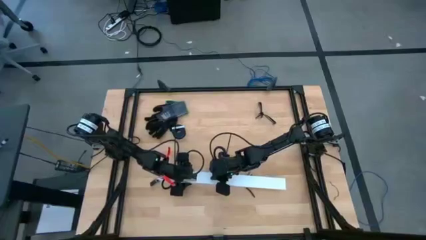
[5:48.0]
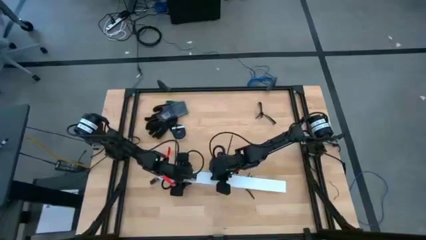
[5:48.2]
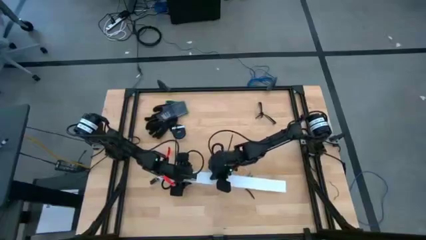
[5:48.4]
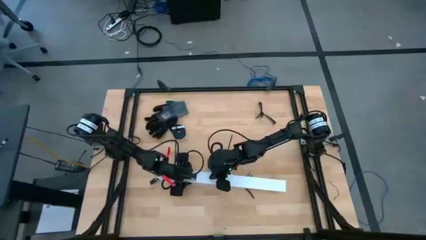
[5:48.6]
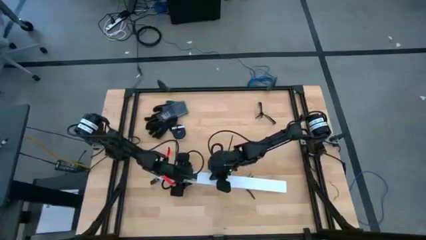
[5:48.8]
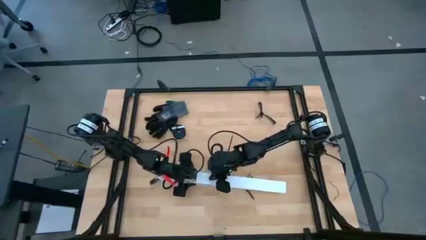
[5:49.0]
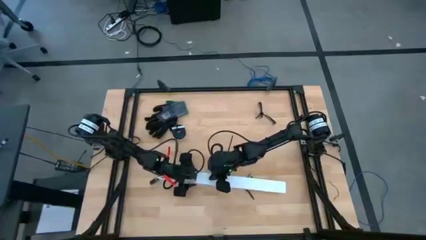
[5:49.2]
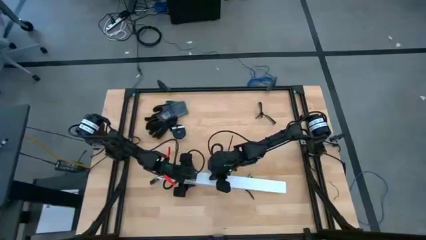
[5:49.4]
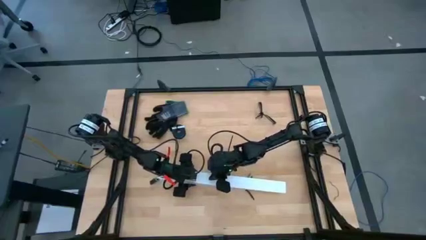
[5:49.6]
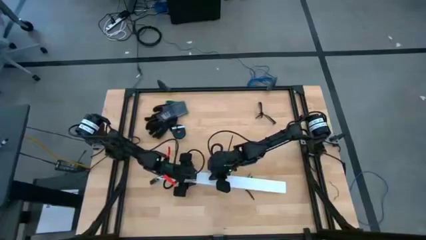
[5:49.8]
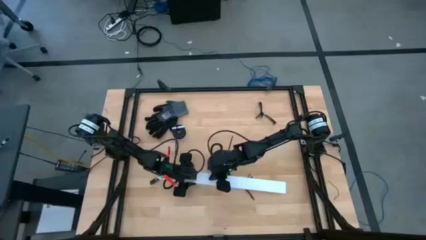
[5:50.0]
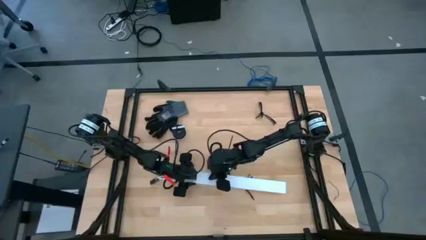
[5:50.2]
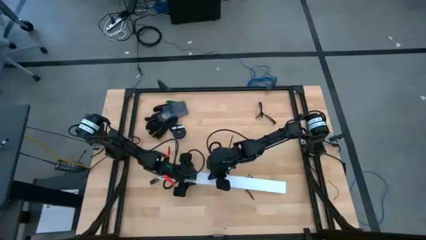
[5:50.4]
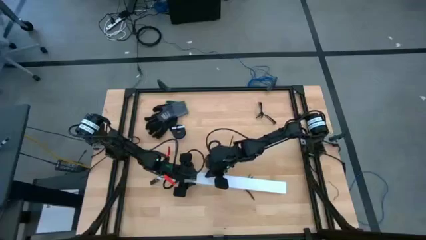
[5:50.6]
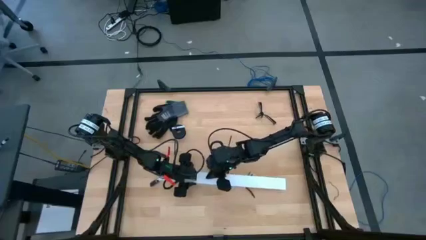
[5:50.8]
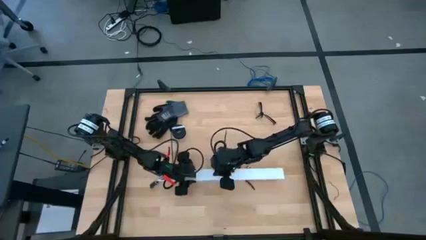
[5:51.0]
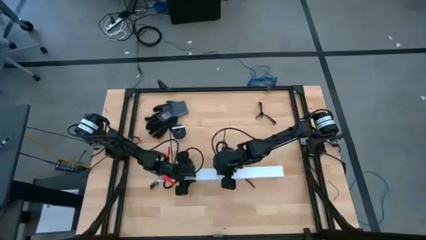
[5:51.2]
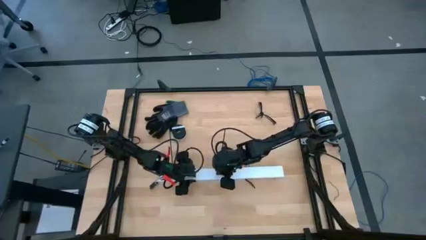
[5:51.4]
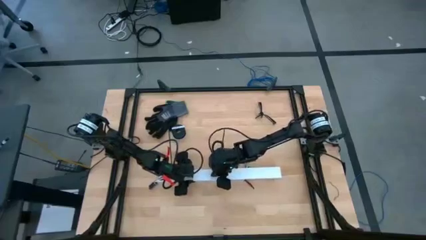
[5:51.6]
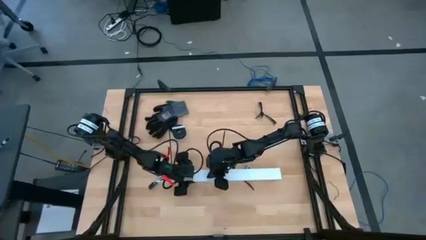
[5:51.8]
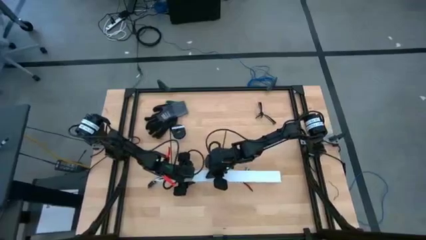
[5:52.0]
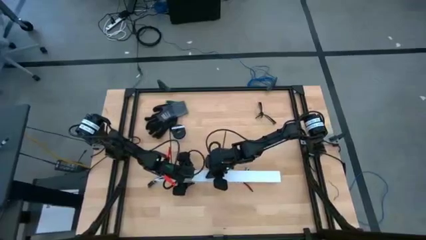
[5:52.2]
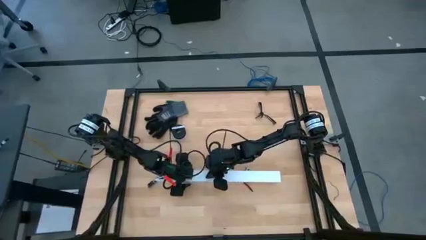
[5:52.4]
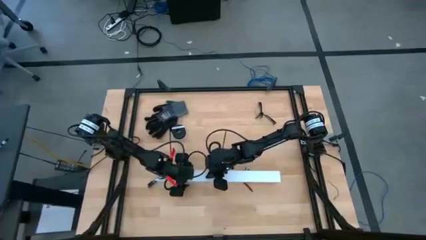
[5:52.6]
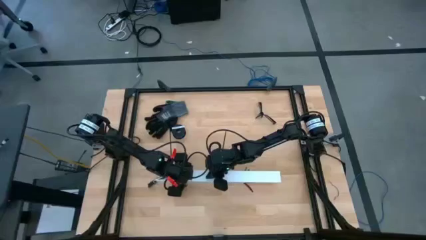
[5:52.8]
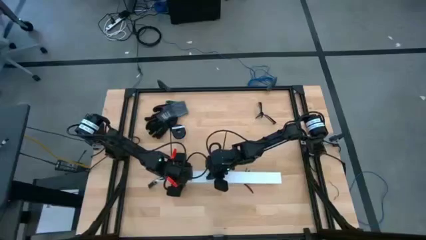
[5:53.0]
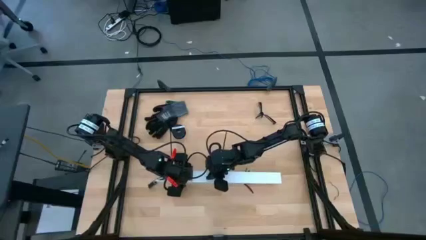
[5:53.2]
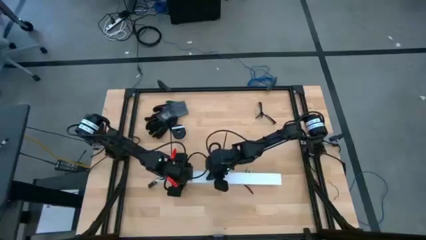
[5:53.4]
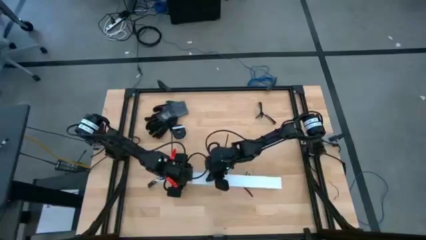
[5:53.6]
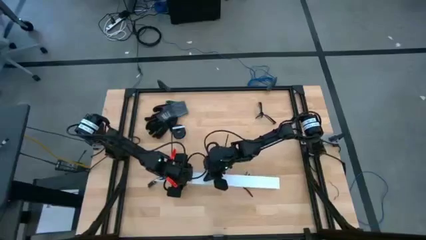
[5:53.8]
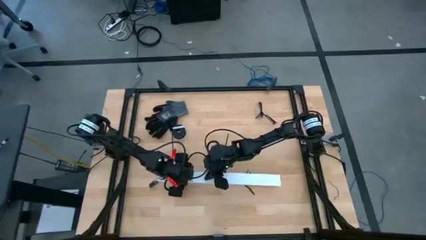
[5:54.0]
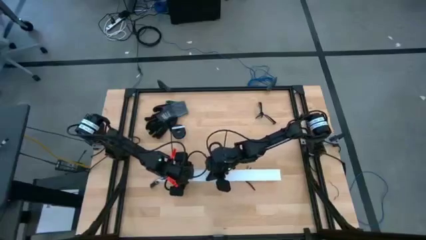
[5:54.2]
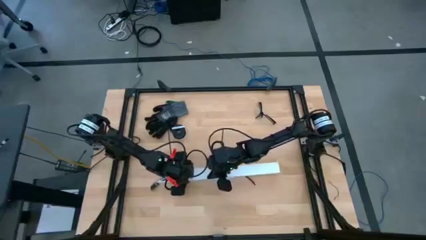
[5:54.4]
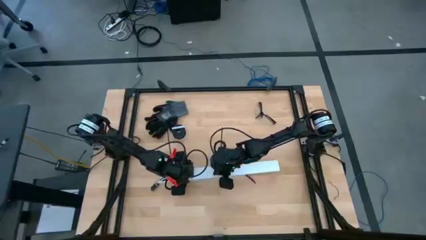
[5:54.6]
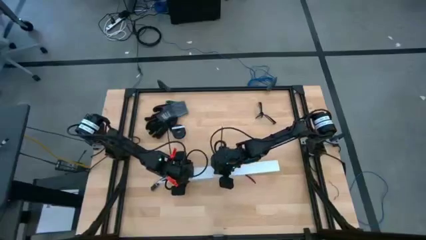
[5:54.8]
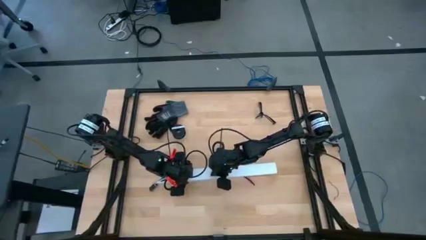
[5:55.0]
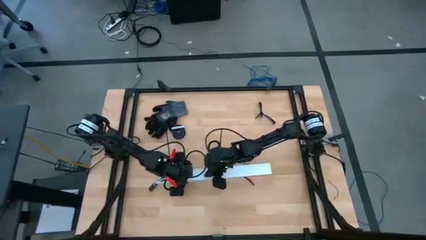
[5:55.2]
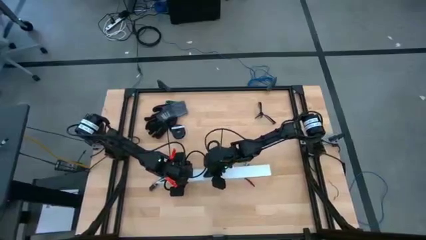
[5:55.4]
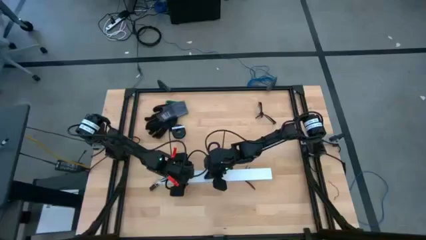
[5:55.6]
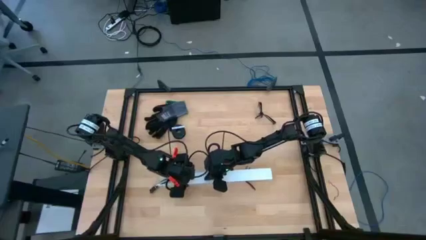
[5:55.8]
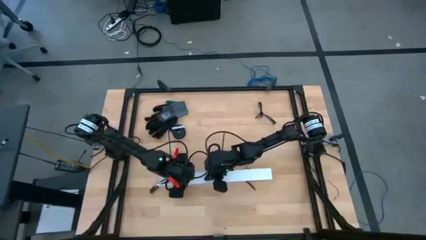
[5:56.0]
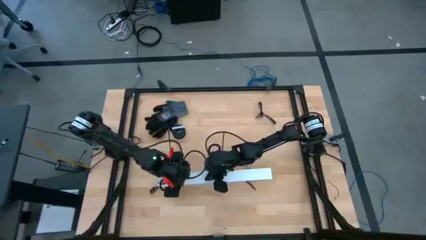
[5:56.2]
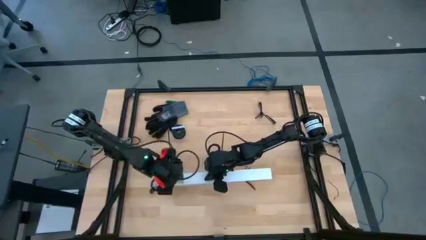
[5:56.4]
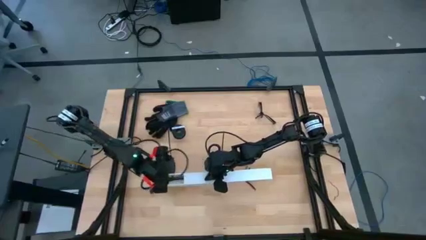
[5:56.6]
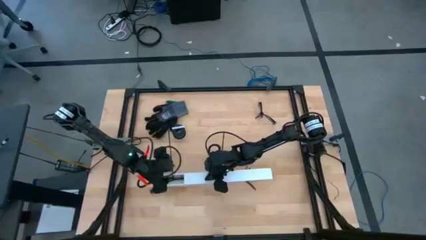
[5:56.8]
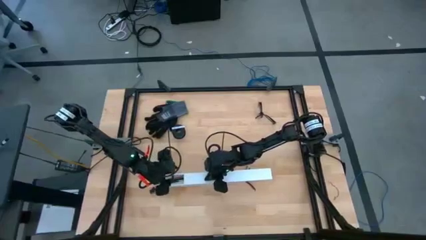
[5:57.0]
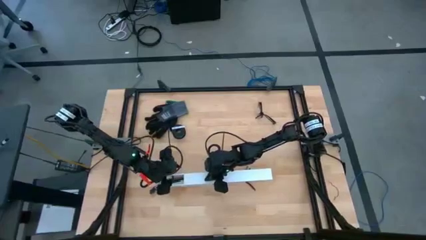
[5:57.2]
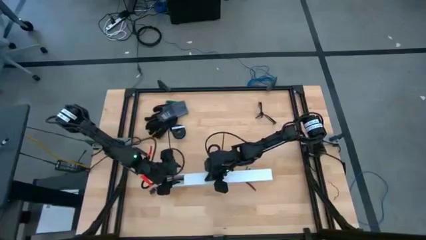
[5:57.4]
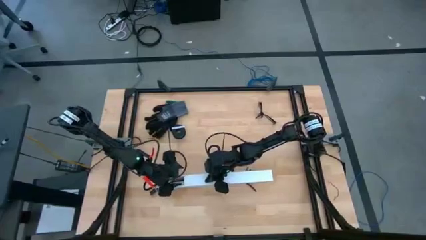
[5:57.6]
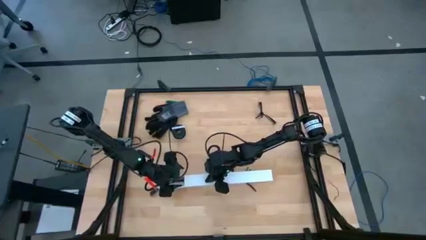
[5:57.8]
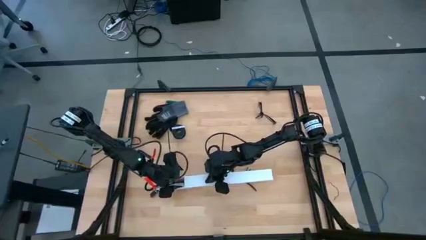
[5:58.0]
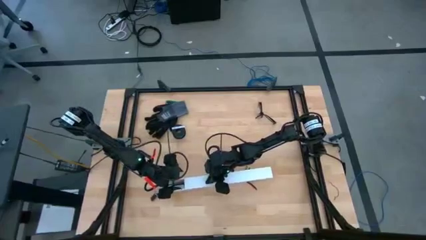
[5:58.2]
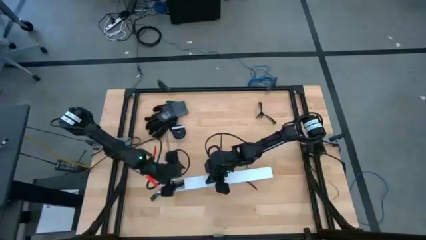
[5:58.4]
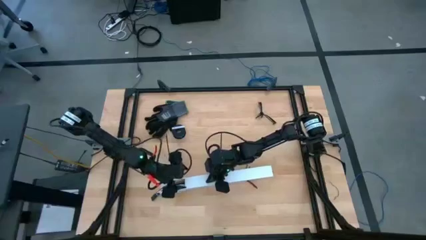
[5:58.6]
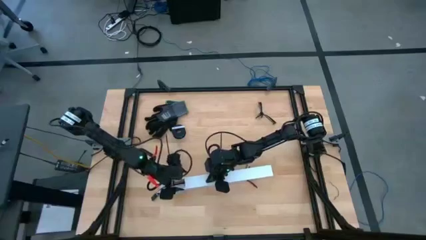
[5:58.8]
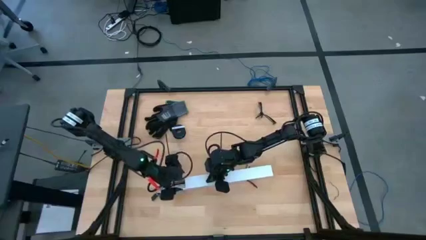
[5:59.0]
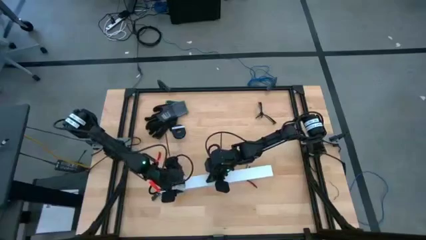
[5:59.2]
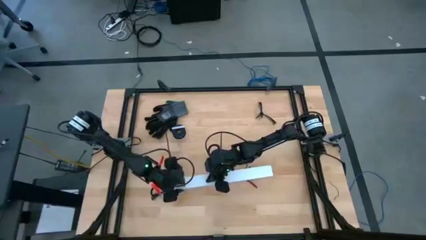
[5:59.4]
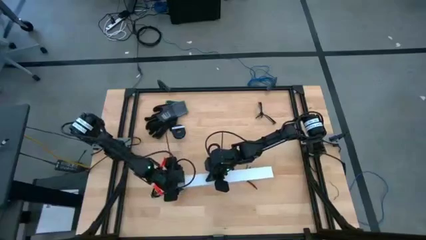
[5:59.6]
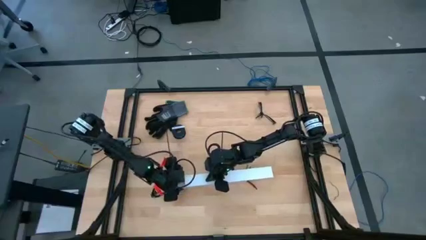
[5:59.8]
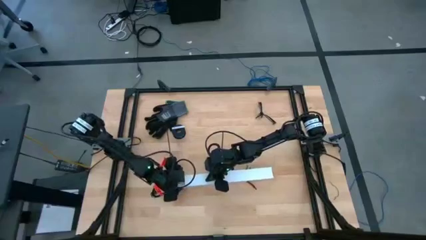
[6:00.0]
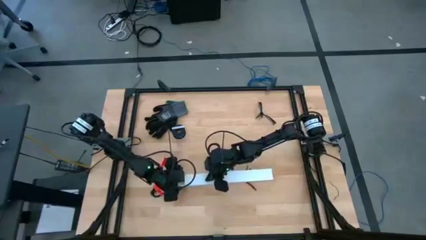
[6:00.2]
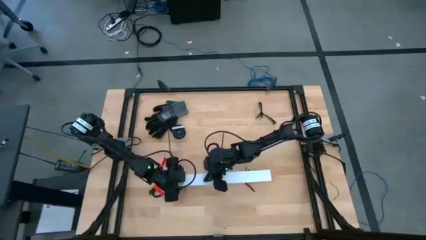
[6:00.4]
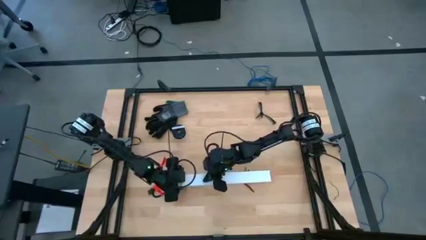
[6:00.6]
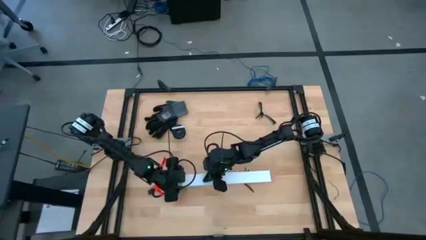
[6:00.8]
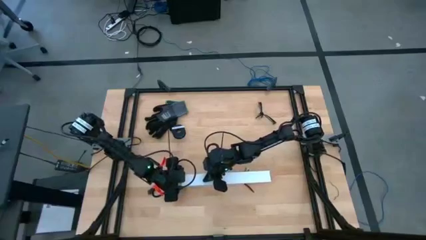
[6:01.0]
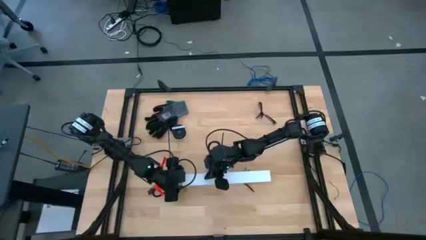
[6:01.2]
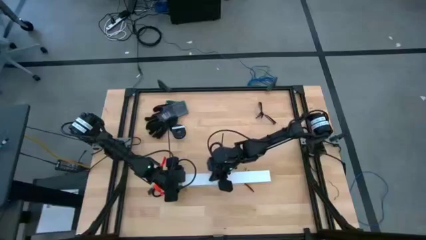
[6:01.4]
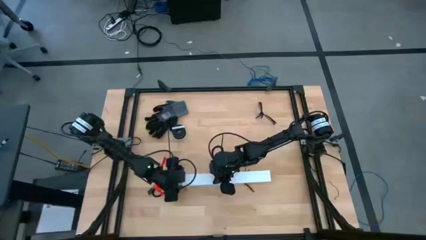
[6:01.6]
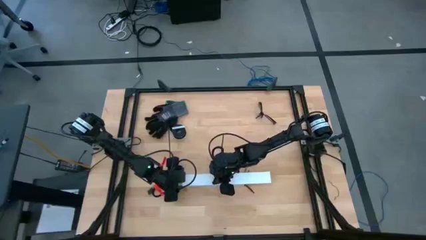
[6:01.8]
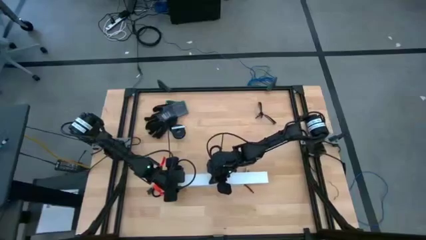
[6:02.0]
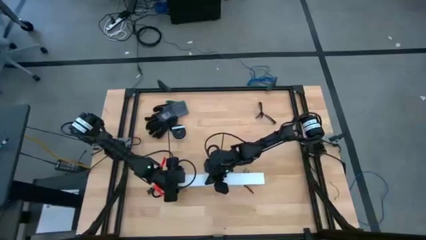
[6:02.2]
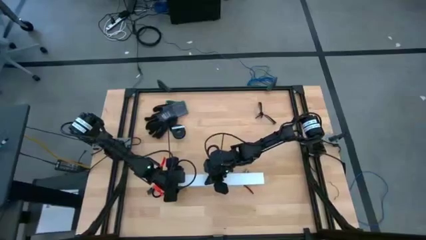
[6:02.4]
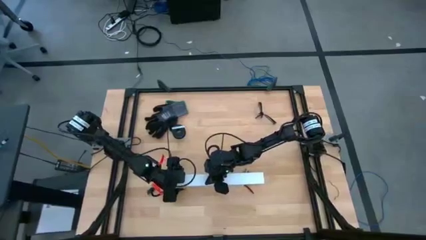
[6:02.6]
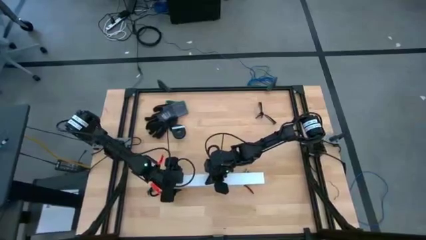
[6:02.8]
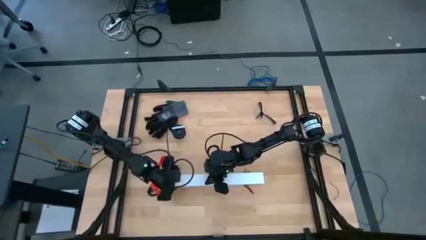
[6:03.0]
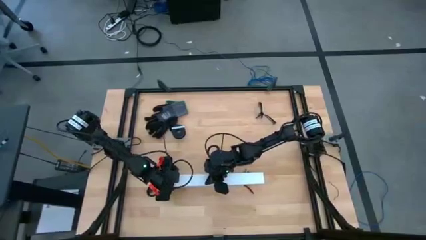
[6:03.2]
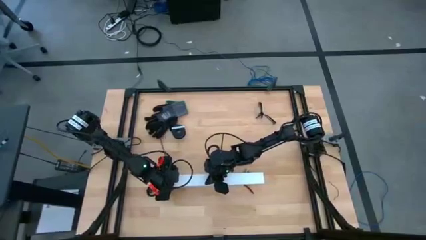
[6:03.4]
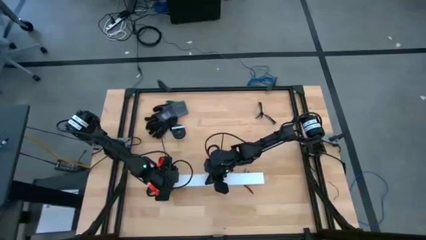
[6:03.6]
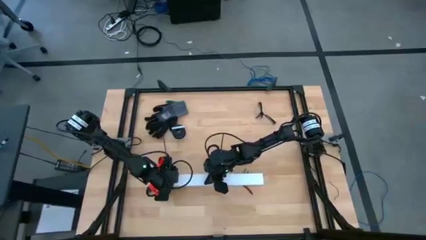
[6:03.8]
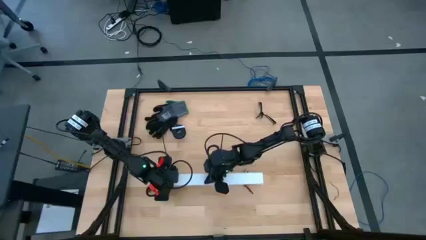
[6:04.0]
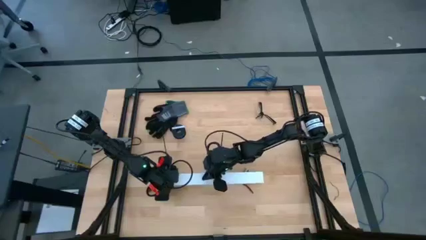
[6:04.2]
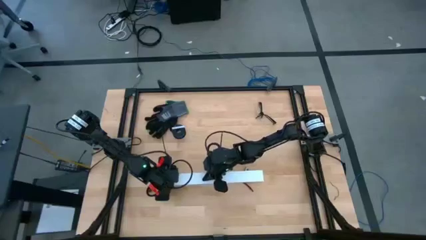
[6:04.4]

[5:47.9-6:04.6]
Task: Ziptie cables
Close the white cable duct cover
